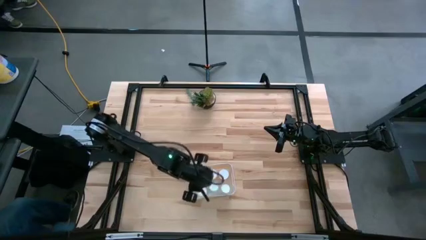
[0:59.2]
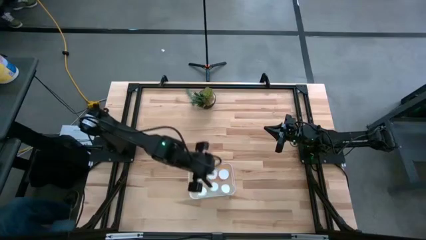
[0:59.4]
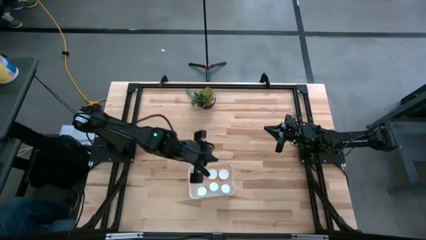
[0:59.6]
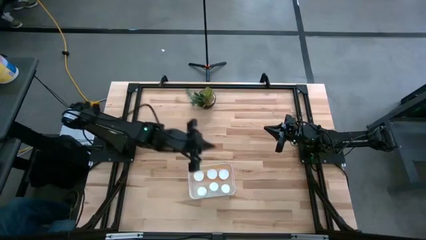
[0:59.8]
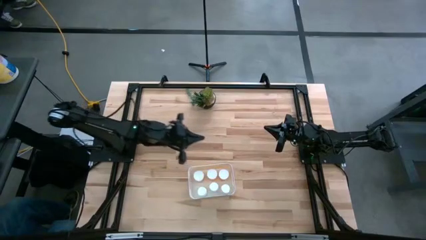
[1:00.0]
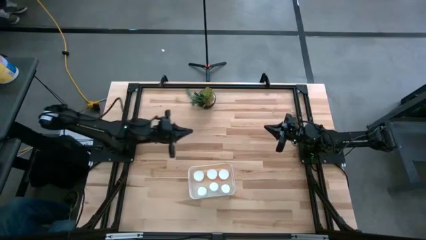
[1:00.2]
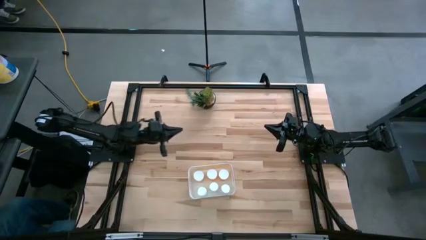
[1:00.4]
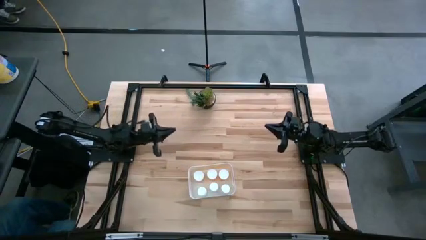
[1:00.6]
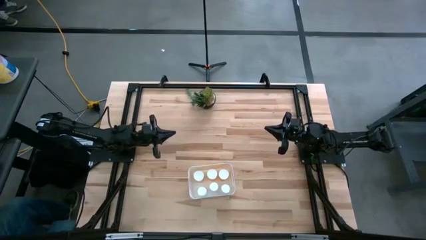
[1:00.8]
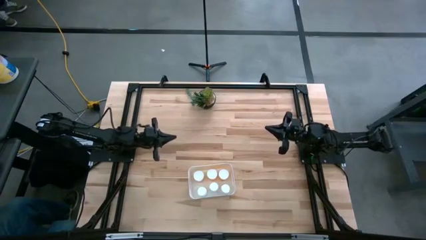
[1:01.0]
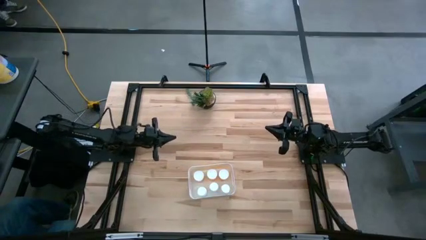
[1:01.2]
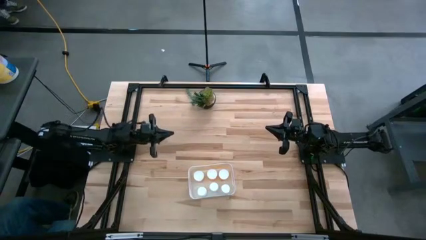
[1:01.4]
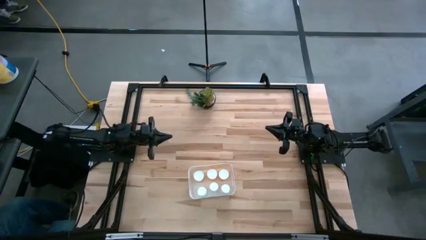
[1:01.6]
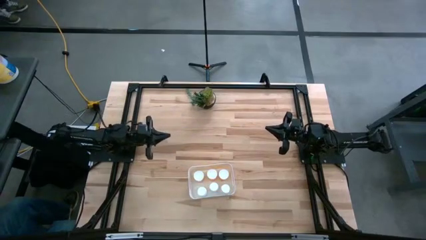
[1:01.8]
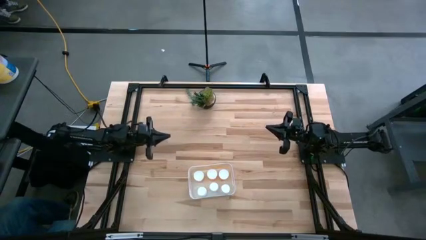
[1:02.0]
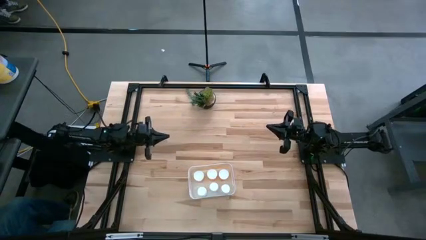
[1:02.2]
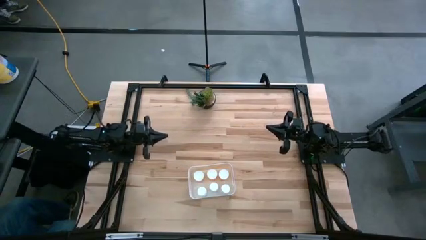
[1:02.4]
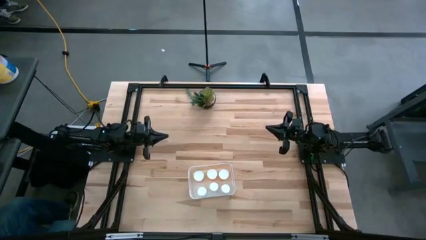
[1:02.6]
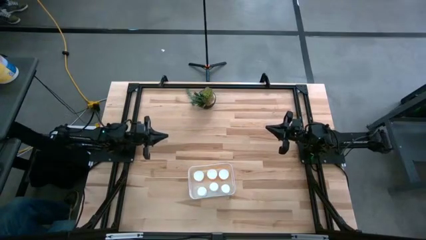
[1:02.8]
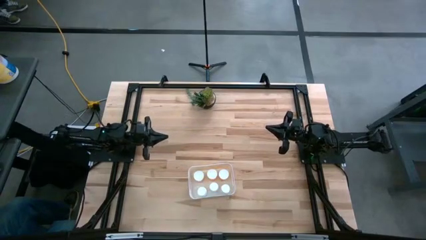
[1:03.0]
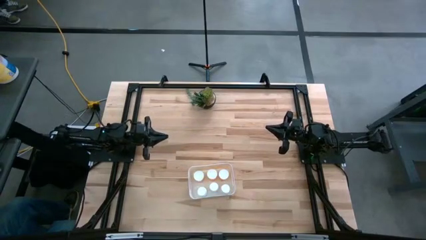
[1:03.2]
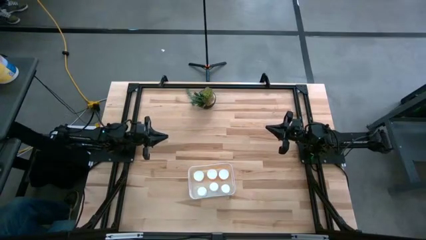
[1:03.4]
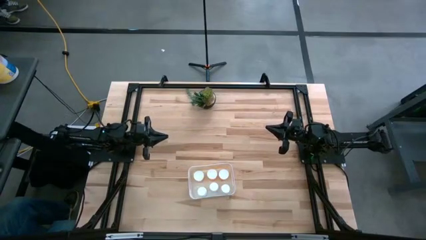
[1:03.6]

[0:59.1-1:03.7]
Task: Pick and place pill bottles into a basket
Return to Home Position

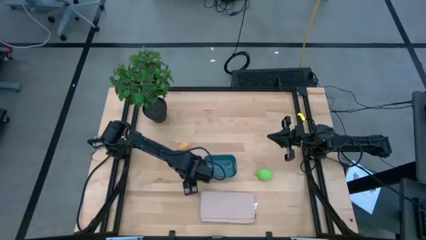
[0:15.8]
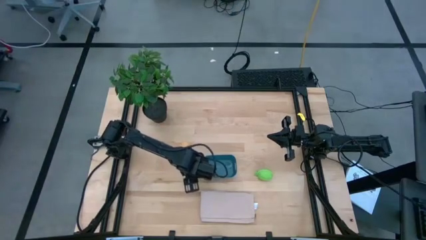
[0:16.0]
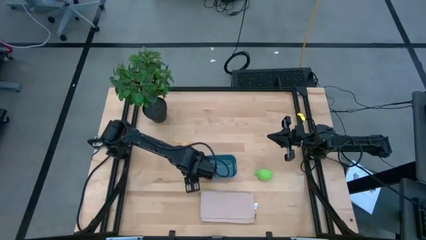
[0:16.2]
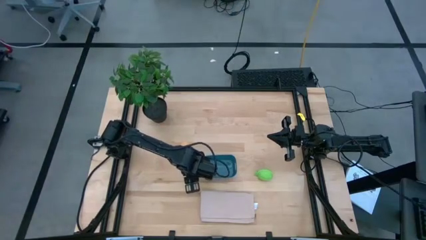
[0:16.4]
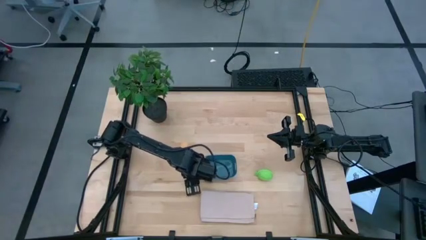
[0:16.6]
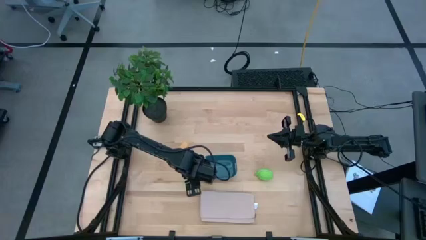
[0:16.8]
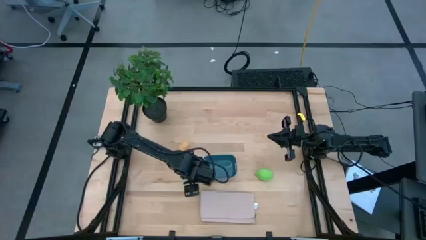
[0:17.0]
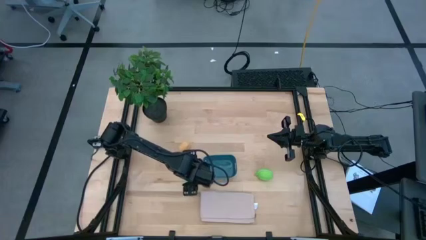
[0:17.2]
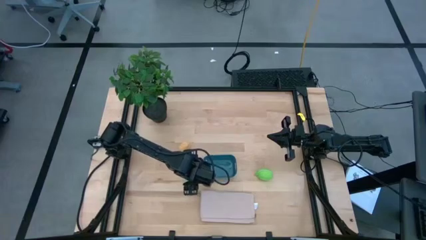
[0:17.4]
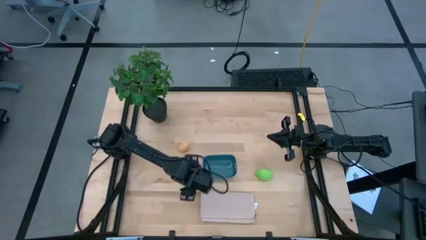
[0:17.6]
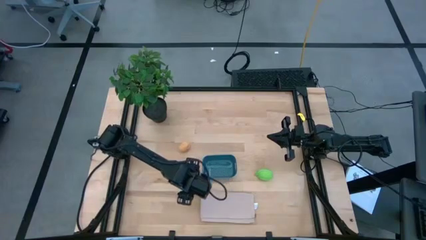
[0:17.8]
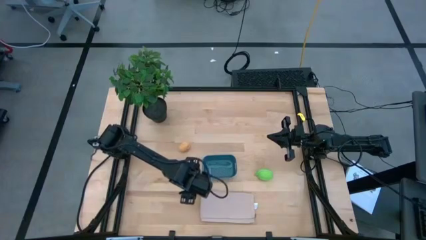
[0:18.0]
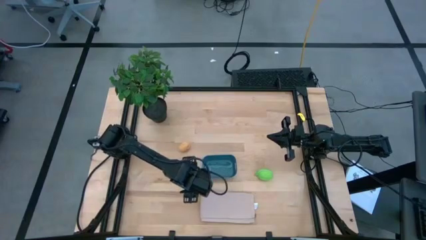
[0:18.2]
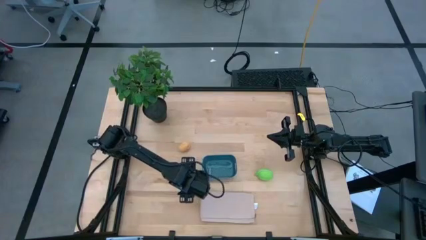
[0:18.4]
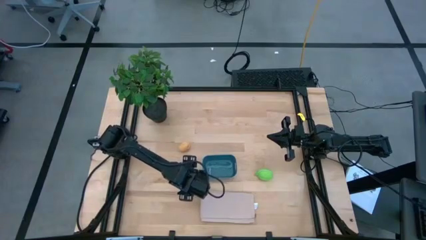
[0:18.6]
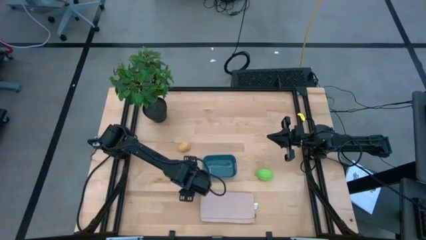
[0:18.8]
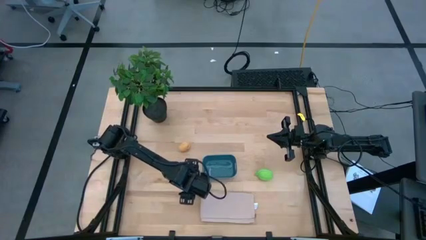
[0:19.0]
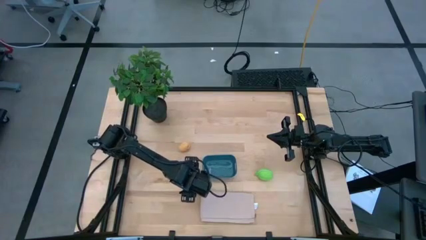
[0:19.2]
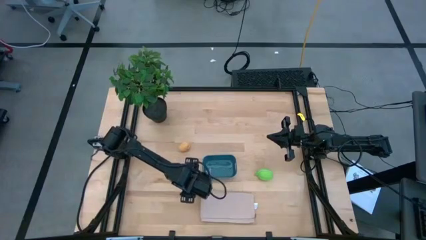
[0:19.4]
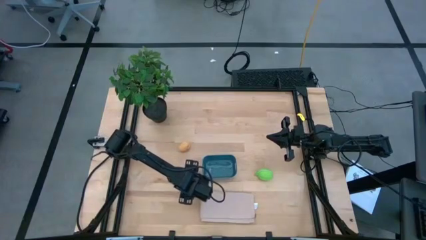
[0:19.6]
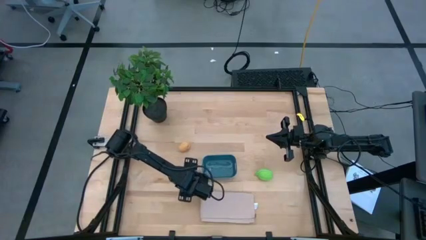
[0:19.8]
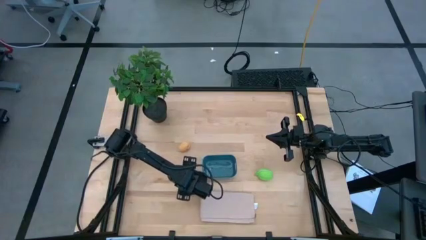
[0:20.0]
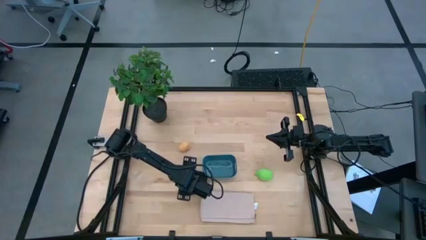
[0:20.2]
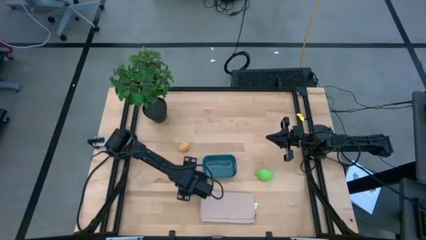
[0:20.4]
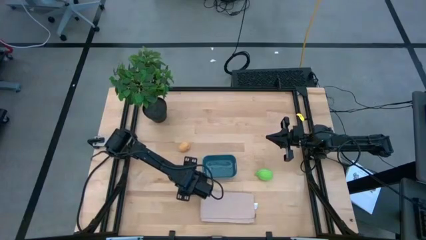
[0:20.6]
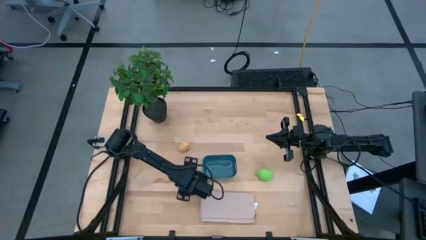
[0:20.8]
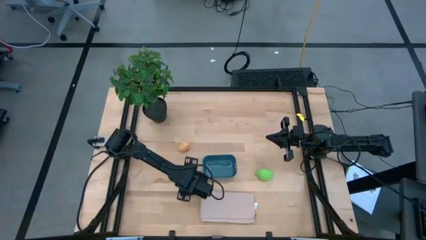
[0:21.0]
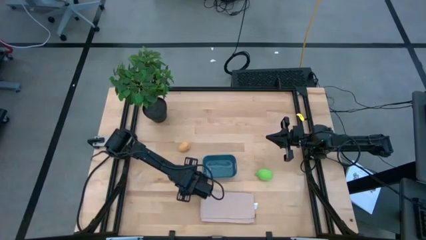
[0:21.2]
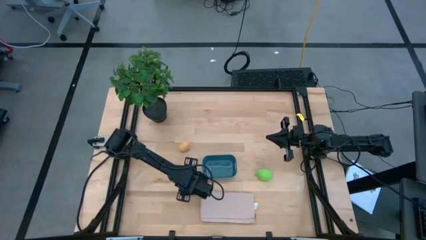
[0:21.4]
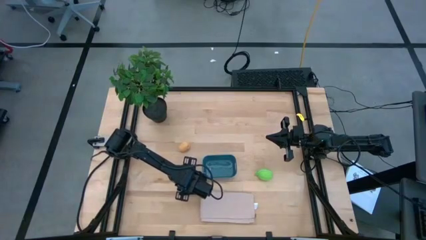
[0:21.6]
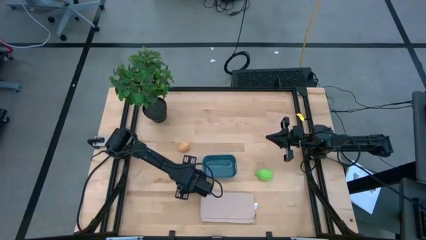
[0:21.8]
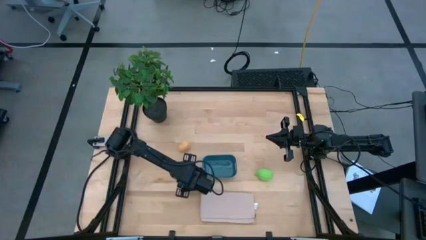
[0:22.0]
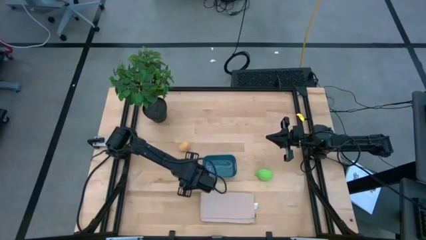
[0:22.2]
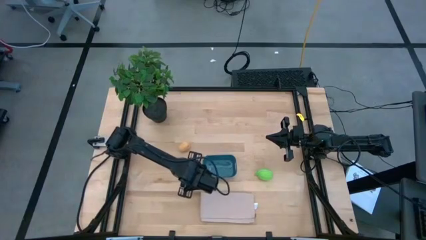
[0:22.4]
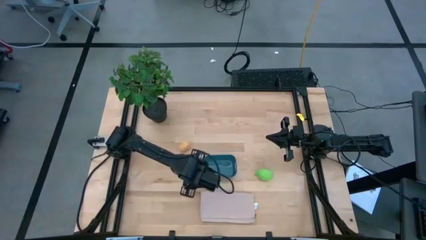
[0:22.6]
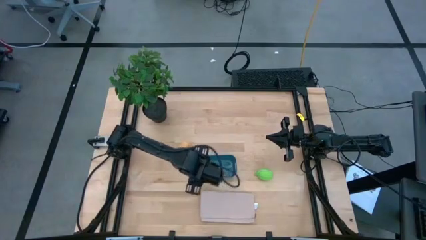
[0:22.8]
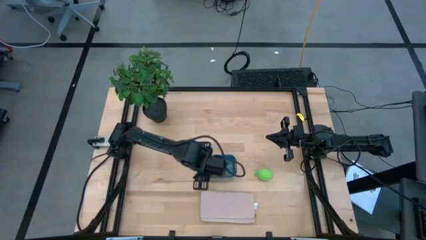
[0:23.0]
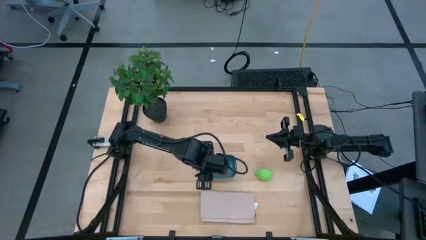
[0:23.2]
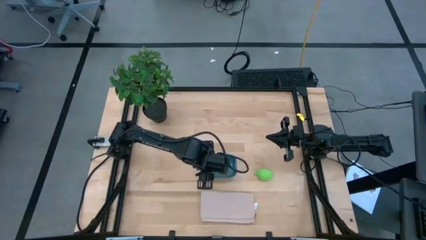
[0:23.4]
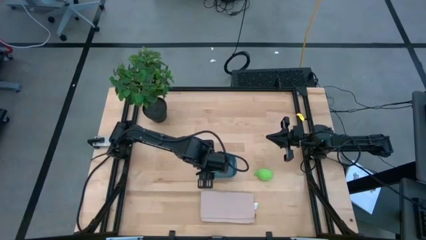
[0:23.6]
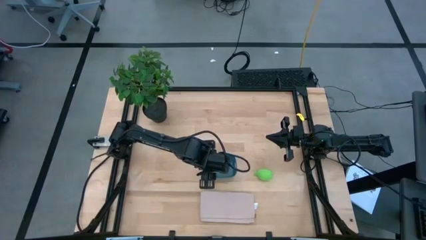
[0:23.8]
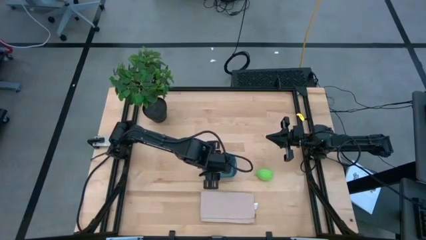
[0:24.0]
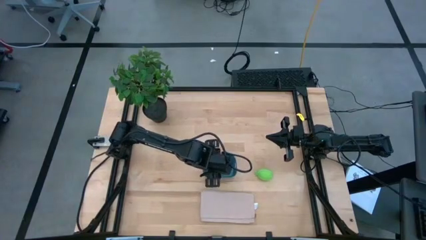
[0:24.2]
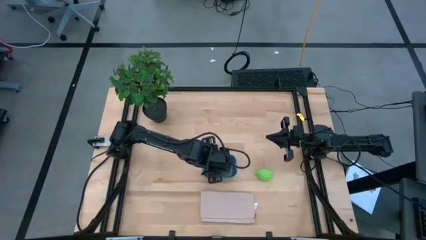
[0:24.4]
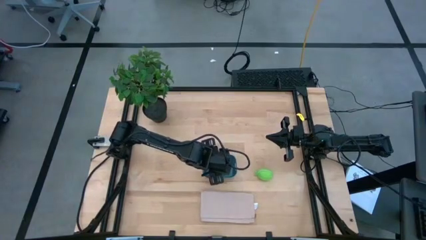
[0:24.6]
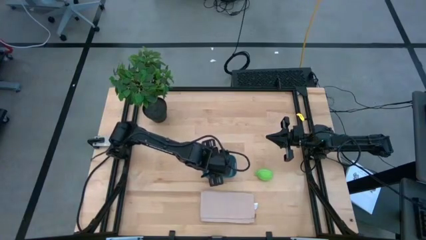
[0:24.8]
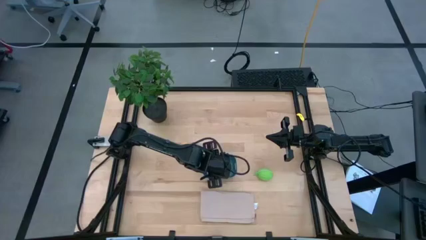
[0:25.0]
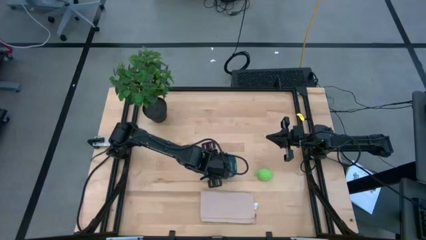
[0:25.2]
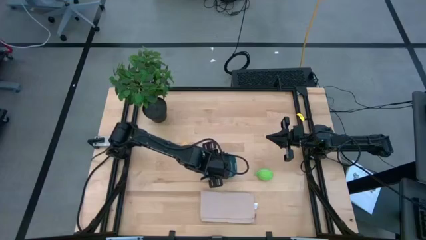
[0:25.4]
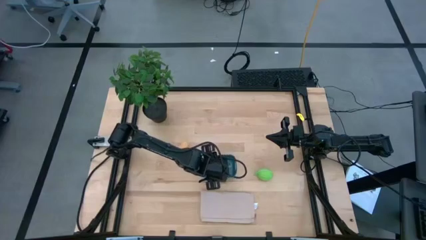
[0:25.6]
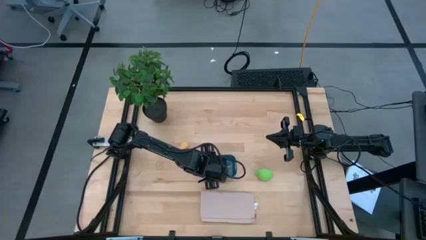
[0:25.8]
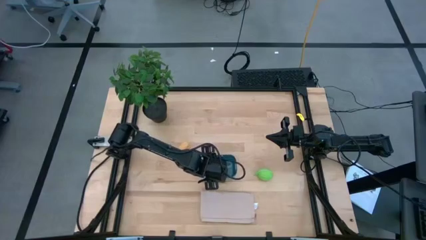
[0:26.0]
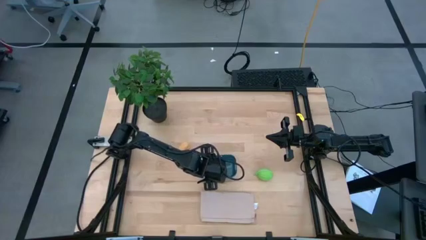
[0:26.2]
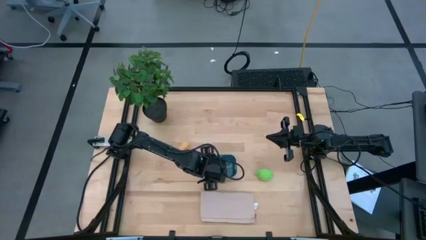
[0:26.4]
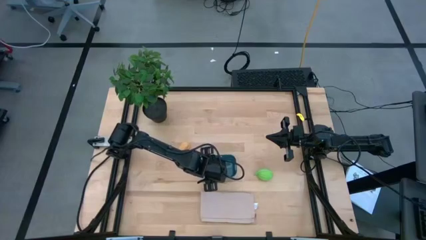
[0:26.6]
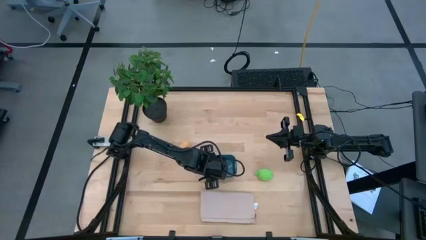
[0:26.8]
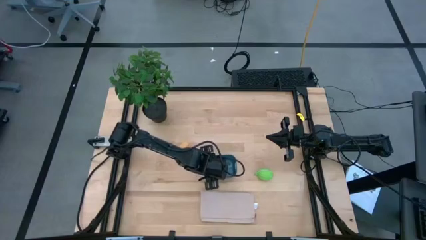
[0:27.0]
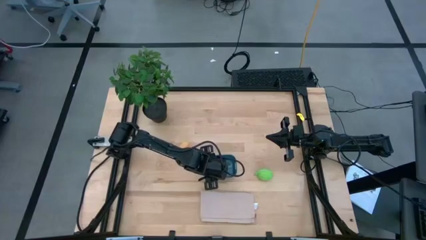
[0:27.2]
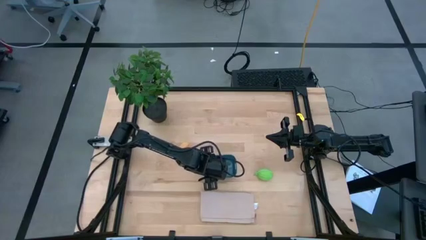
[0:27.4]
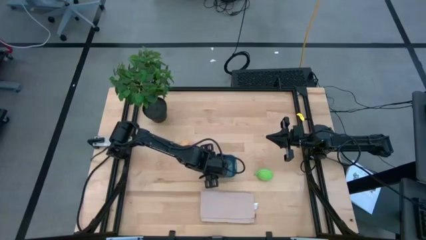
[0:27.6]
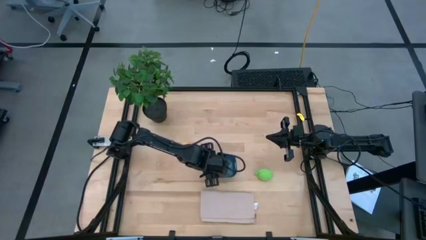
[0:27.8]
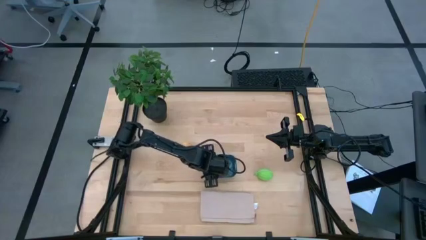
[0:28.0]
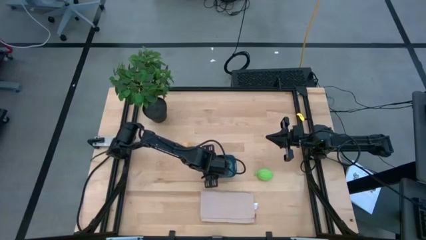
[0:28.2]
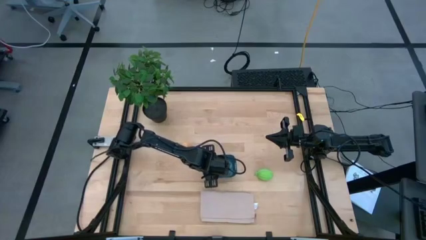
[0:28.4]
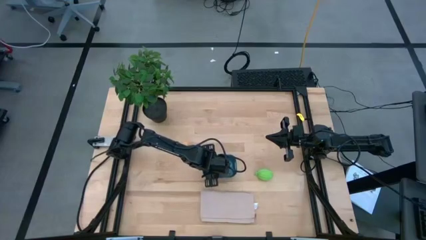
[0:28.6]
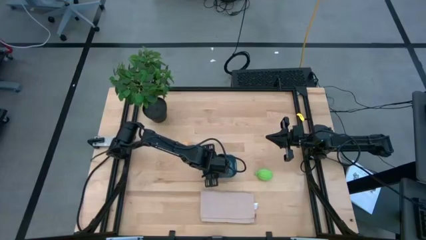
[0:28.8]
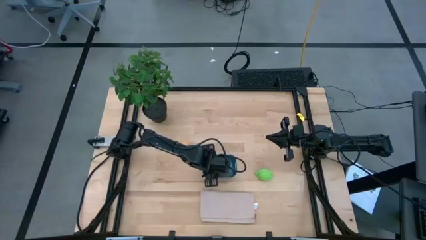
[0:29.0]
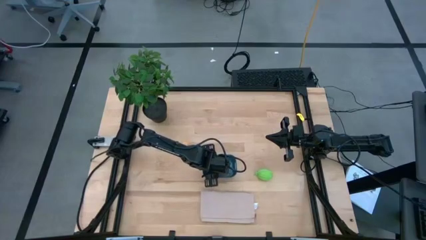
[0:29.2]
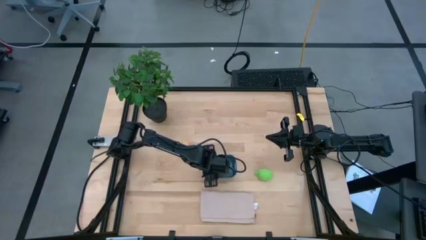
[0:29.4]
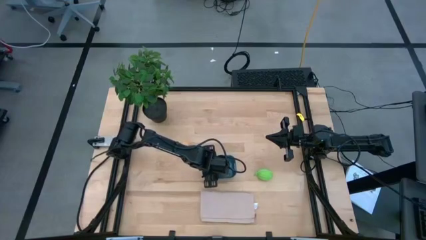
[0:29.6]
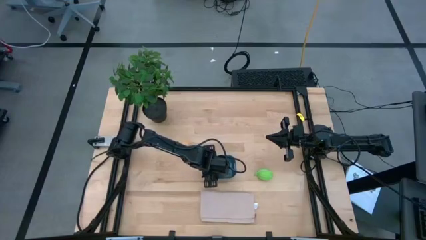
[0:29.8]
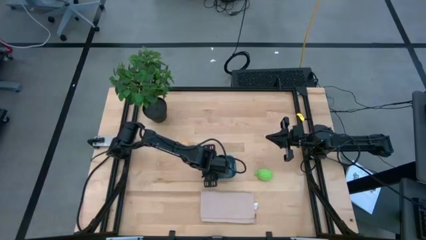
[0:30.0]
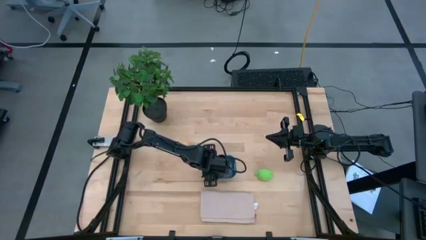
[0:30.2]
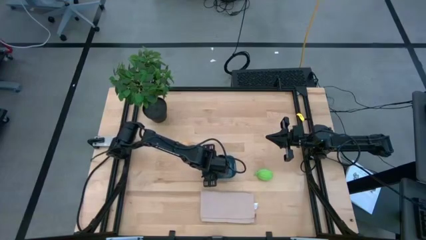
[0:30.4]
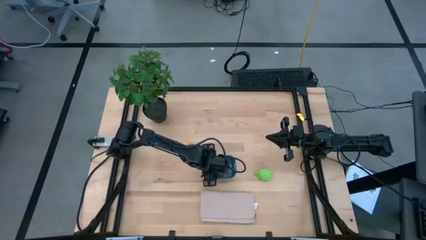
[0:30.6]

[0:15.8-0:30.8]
Task: Pick and placing Produce into tupperware
Put the green pear into the blue bin
